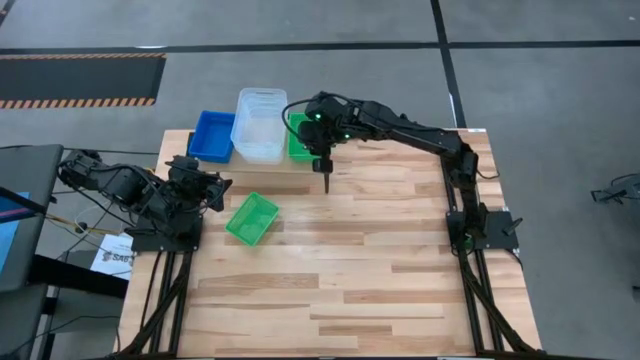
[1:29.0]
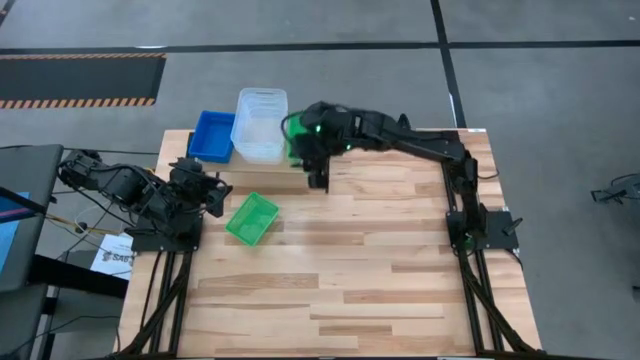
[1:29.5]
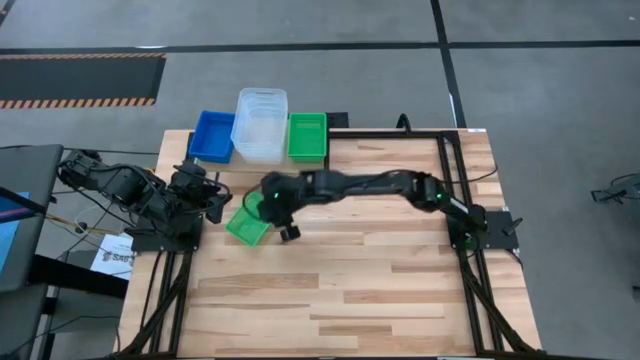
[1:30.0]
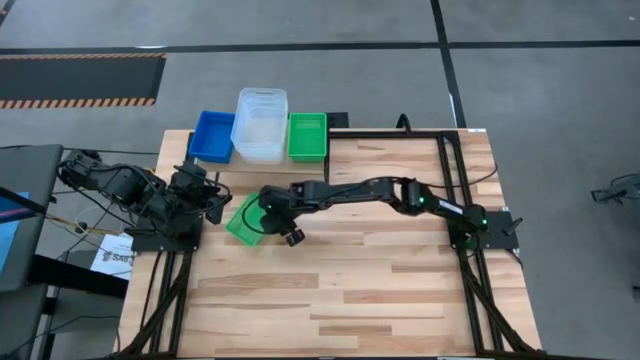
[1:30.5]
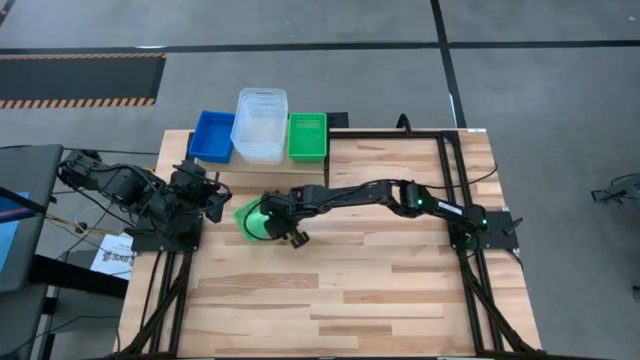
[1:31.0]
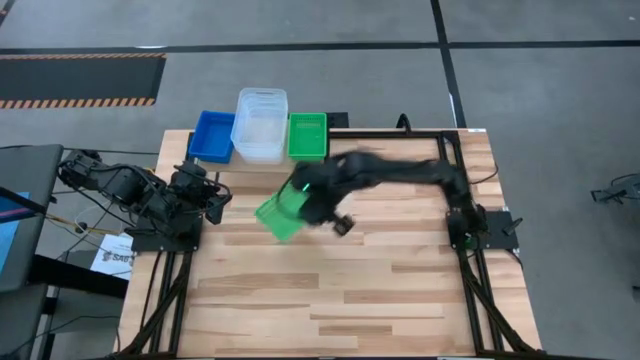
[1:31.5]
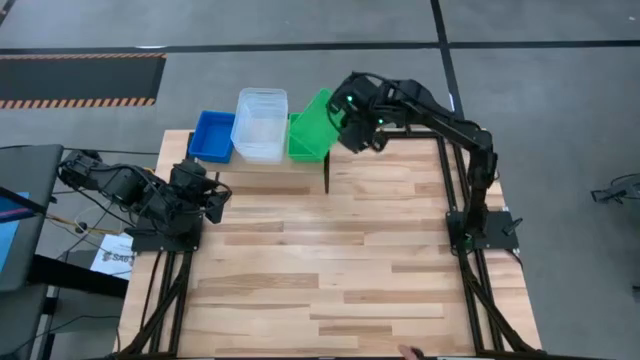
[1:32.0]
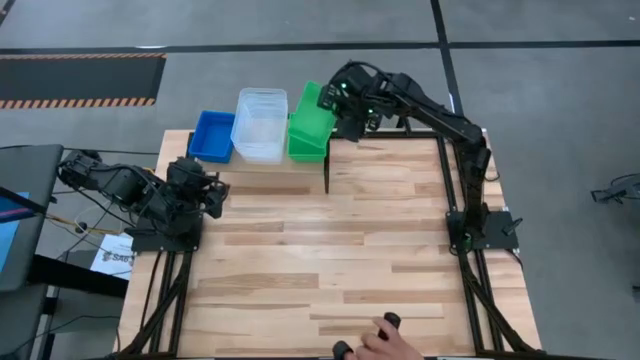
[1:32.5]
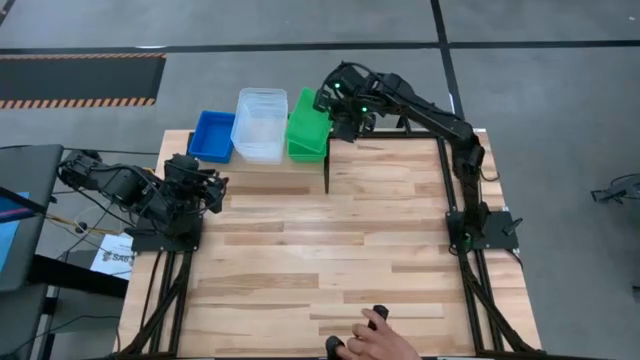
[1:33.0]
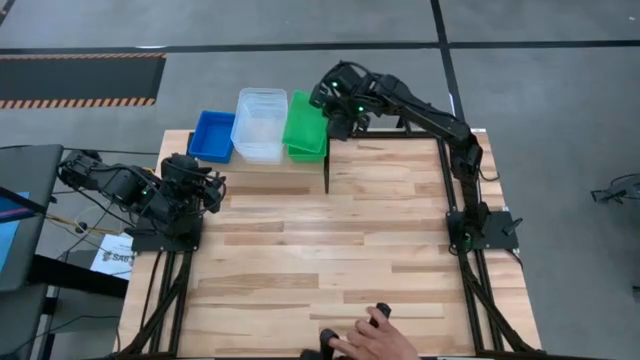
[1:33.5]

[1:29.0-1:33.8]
Task: Stack baskets on shelf by color
Stack the green bin on top of the other green bins on the shelf

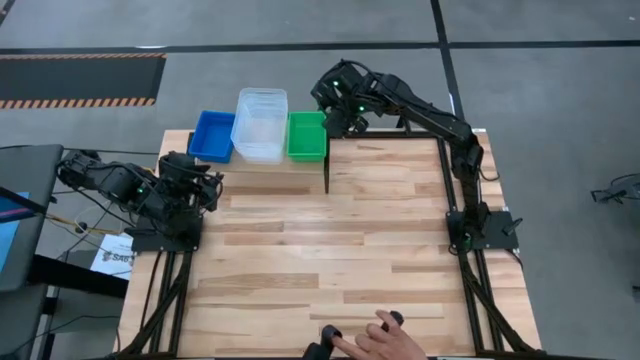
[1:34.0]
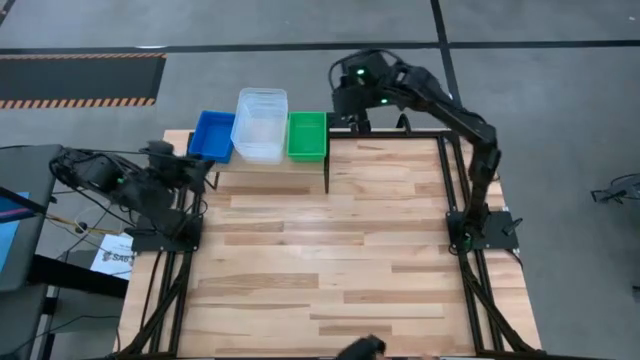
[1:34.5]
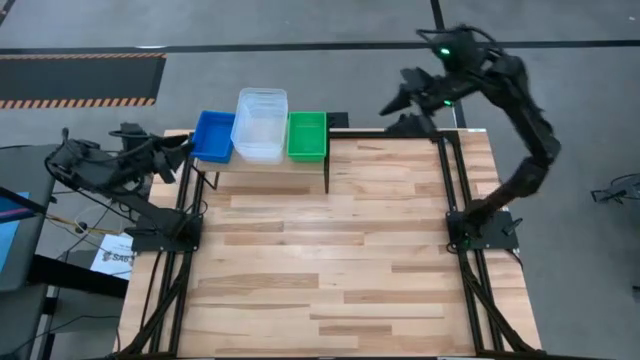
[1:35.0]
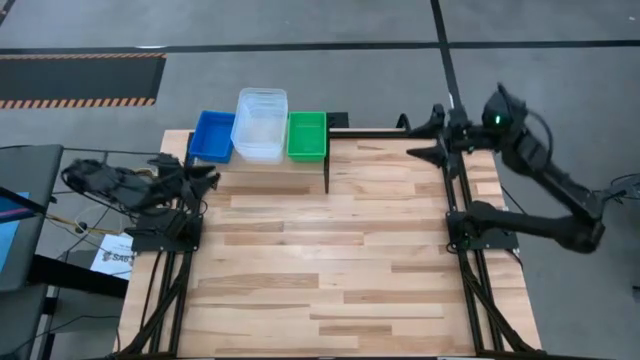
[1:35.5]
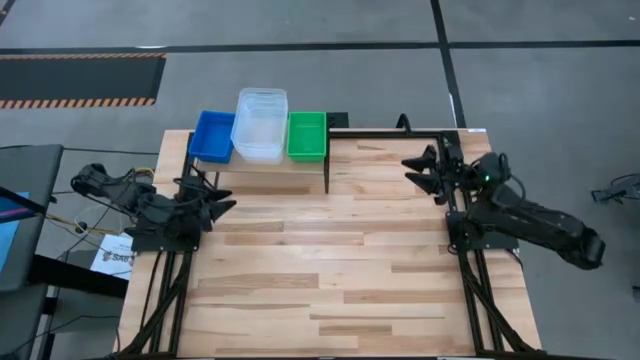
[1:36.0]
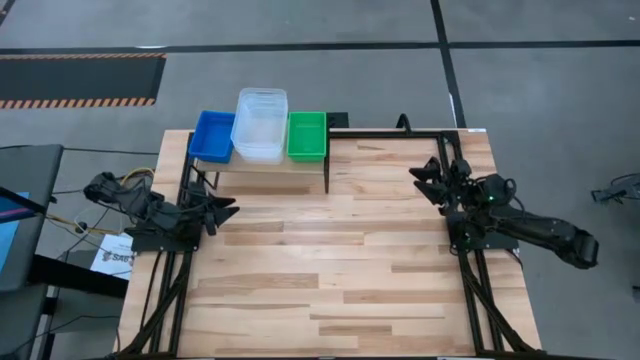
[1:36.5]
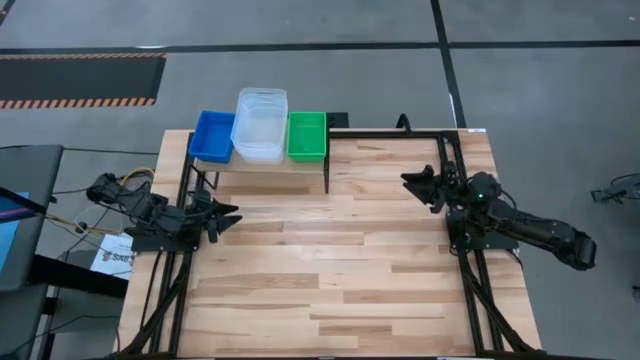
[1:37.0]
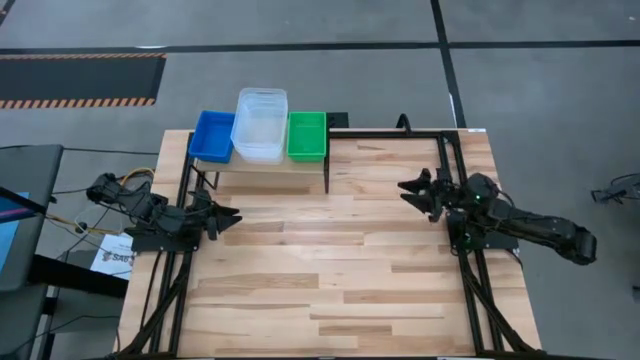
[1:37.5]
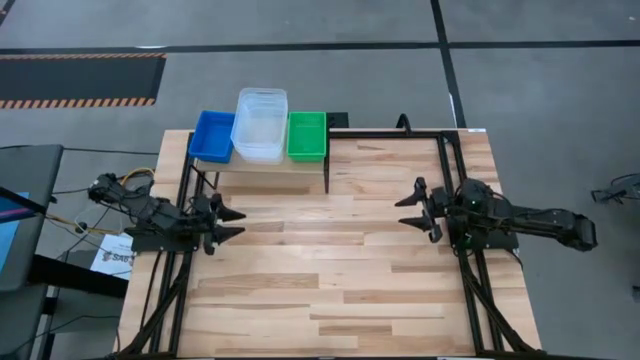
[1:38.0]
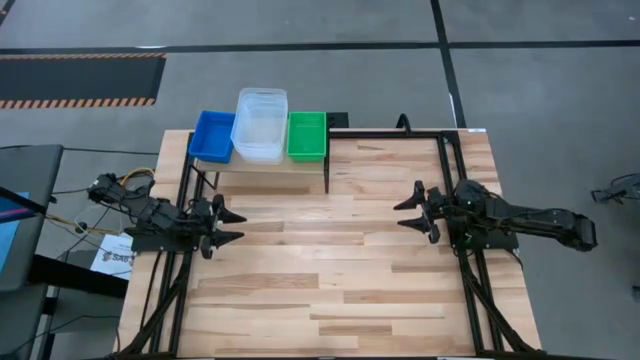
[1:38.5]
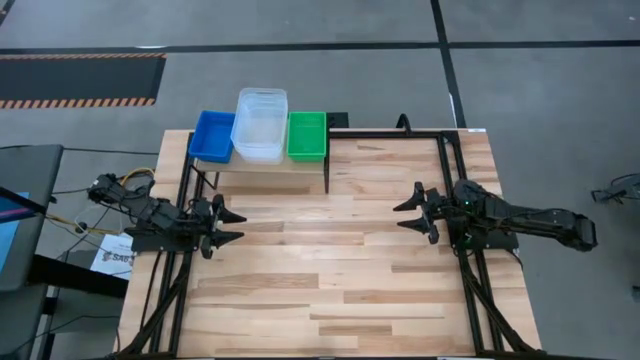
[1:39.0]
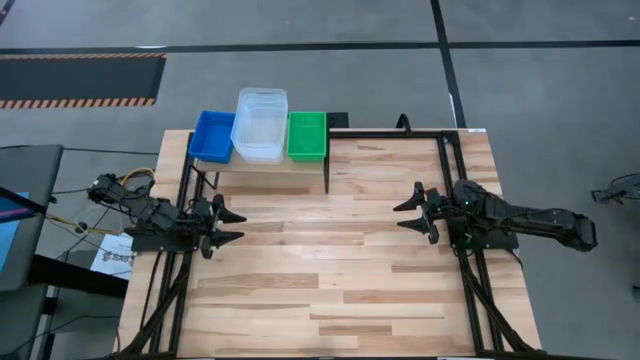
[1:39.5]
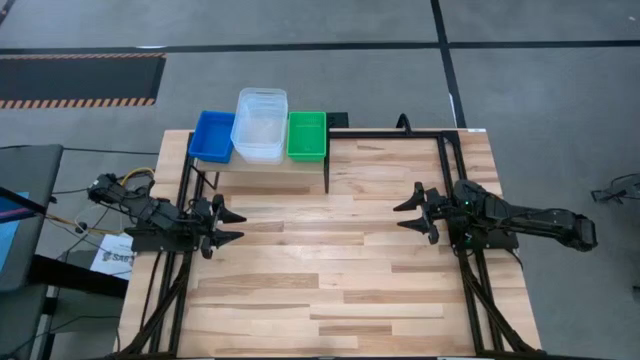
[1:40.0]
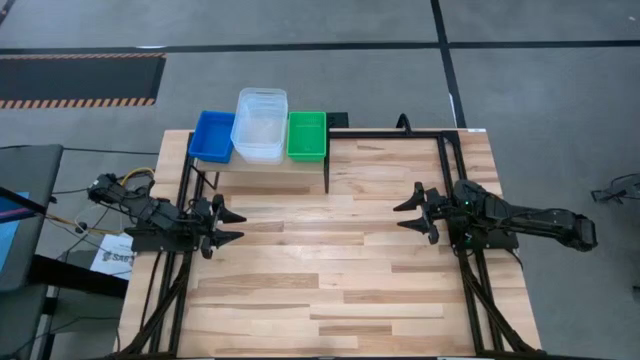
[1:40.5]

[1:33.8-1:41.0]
Return to Home Position

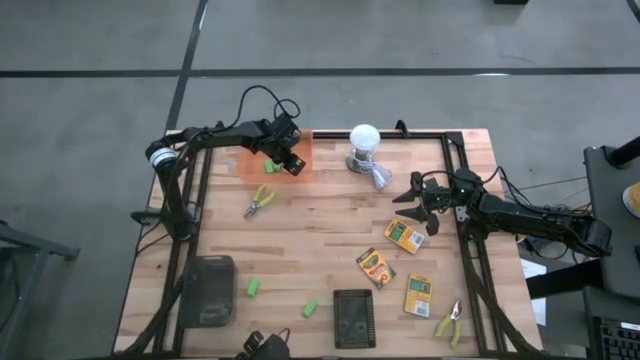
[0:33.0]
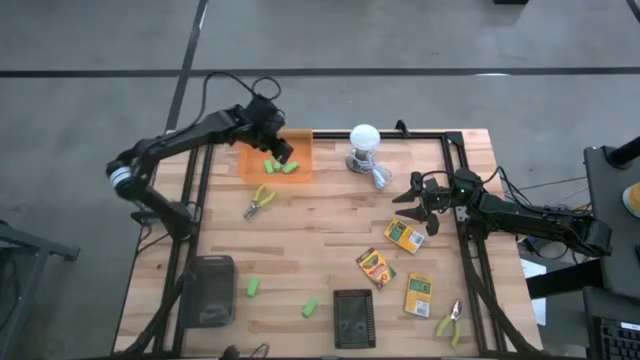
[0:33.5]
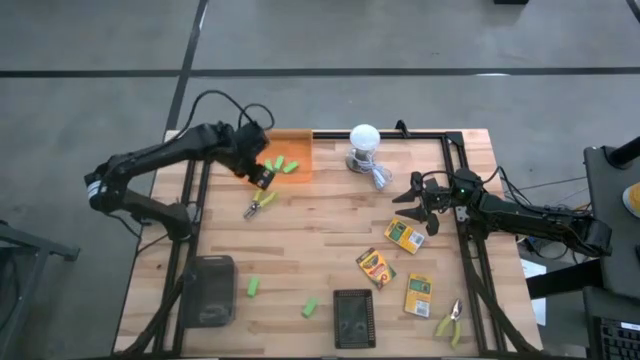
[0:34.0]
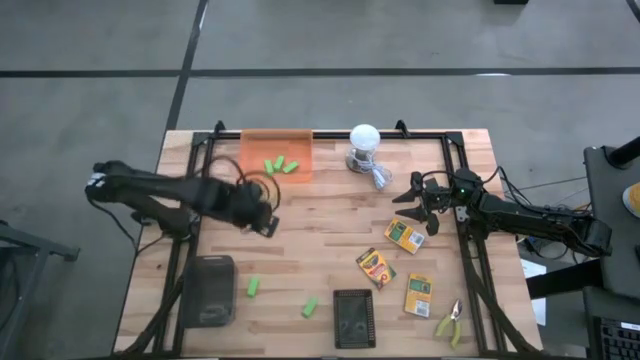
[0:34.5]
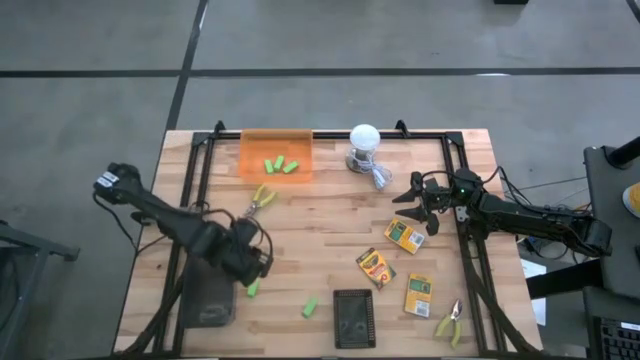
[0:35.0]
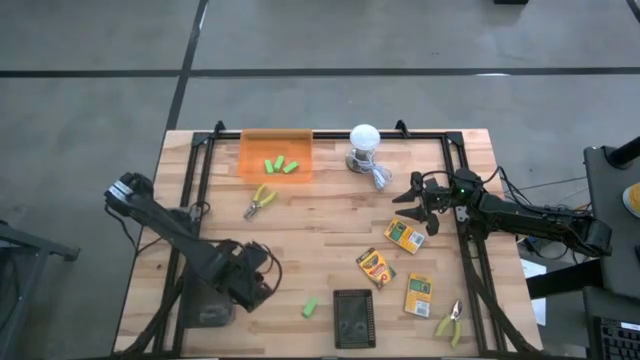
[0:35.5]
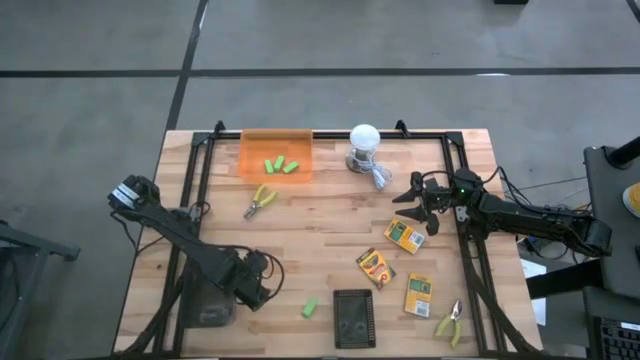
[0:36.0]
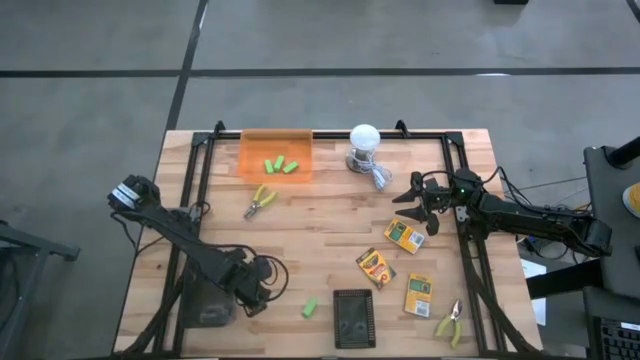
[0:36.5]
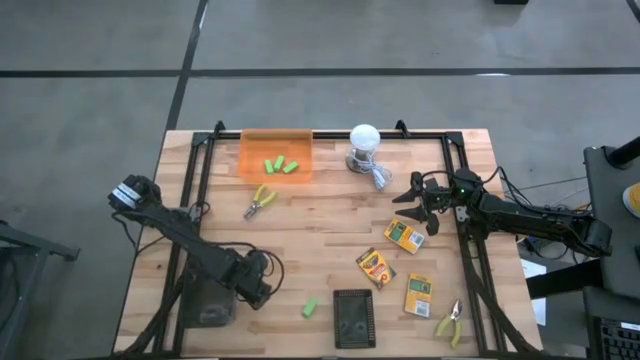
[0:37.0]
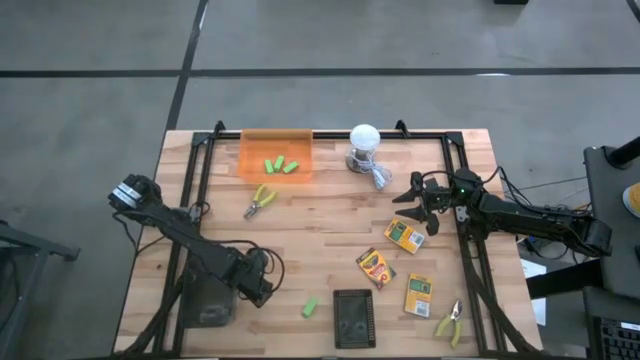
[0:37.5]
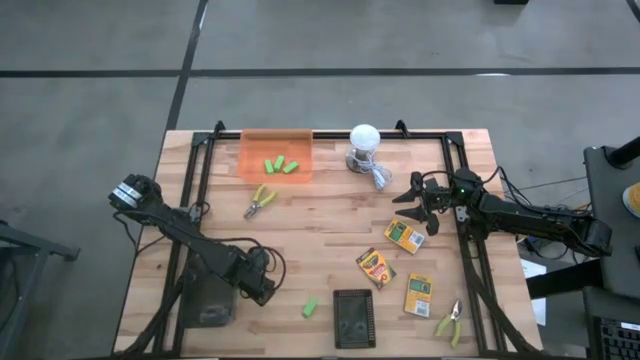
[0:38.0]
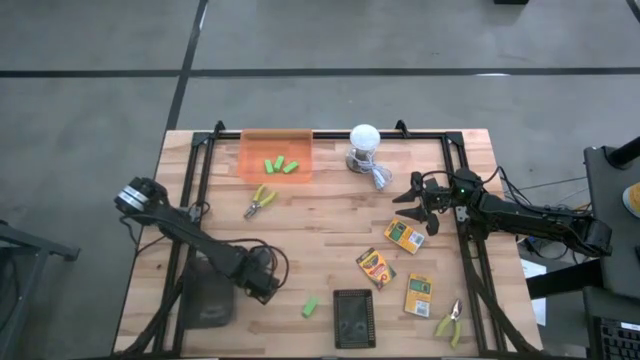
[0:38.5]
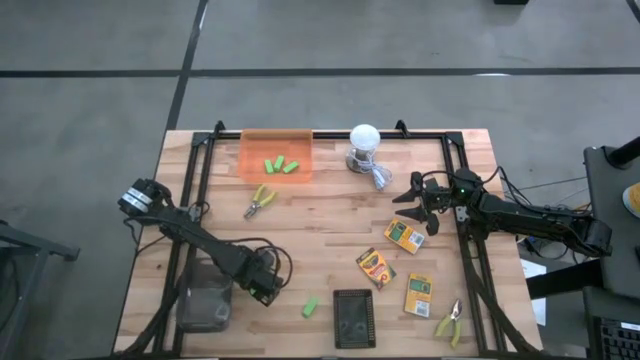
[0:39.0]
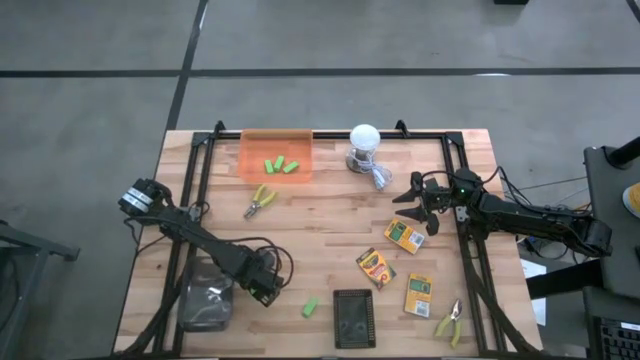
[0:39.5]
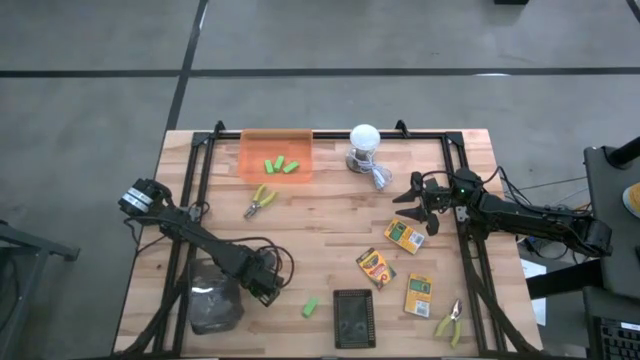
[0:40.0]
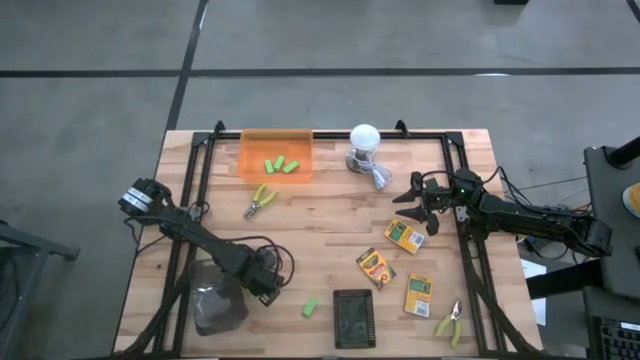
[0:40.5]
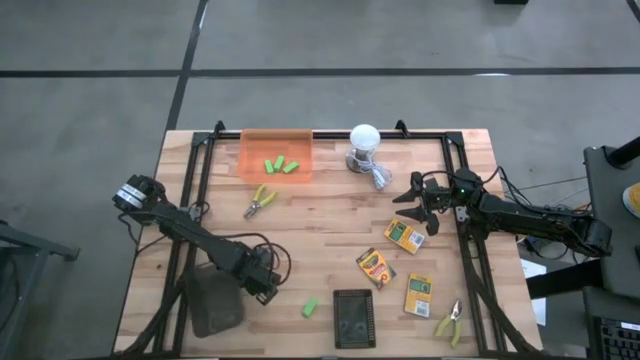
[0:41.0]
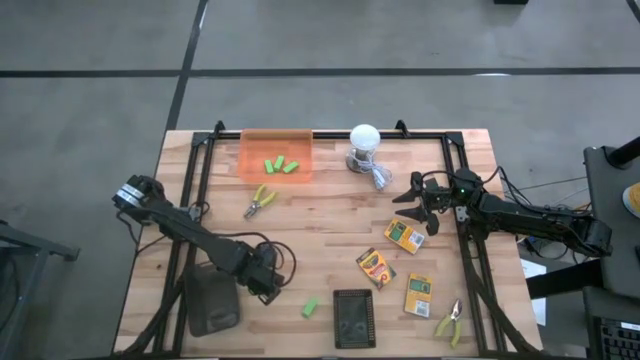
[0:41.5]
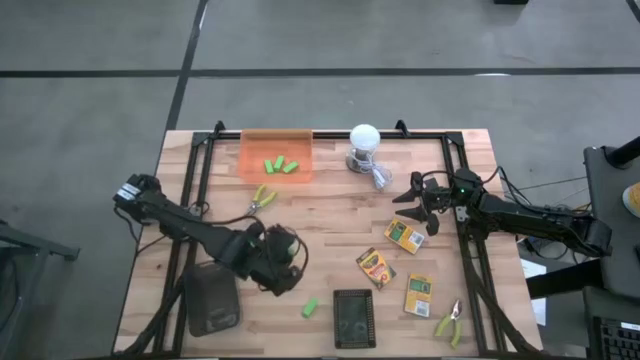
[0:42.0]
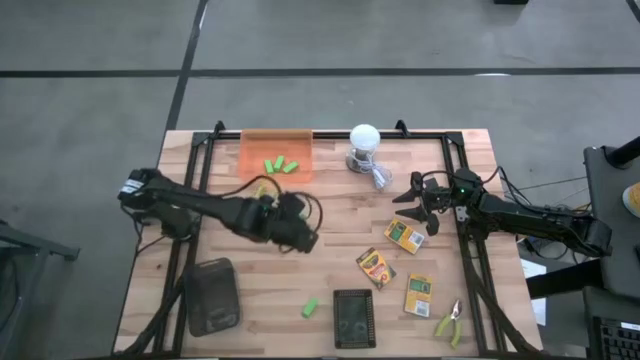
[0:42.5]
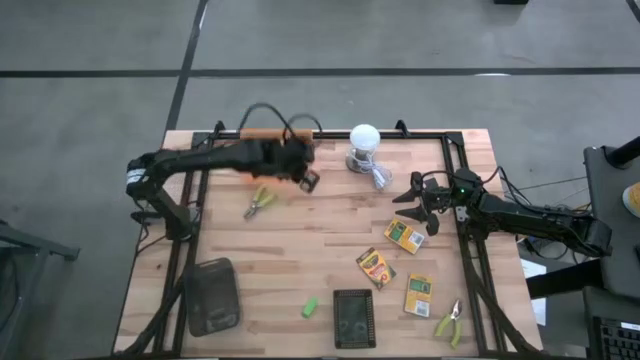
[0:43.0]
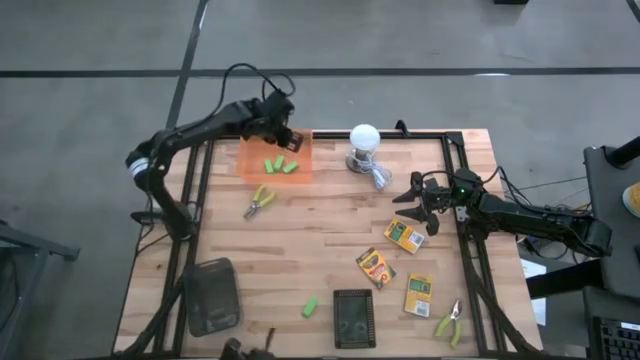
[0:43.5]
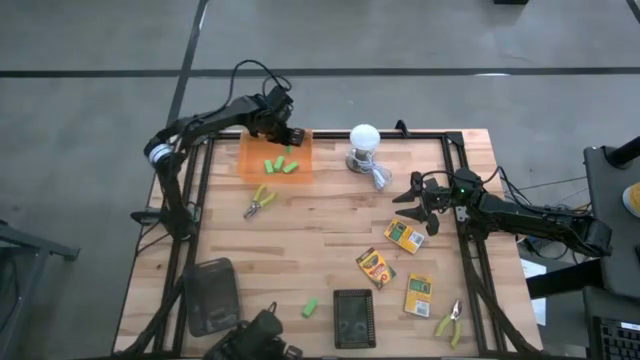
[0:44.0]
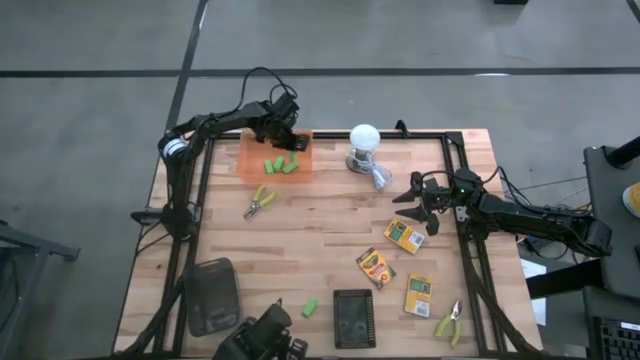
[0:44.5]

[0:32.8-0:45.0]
Task: Pick & Place School Supplies
Put the green eraser into the orange bin
